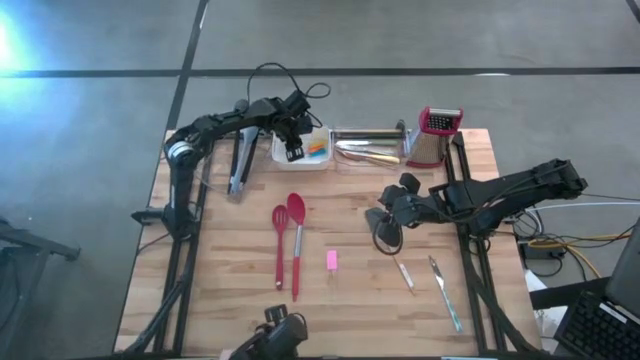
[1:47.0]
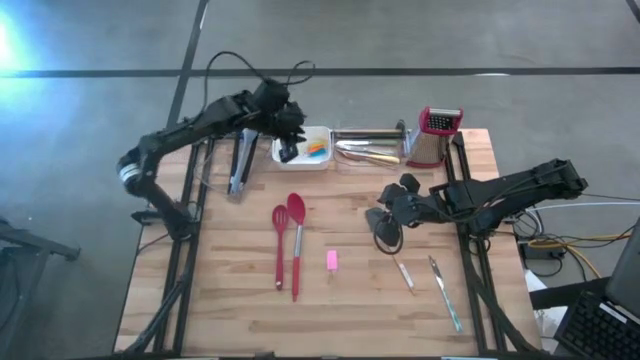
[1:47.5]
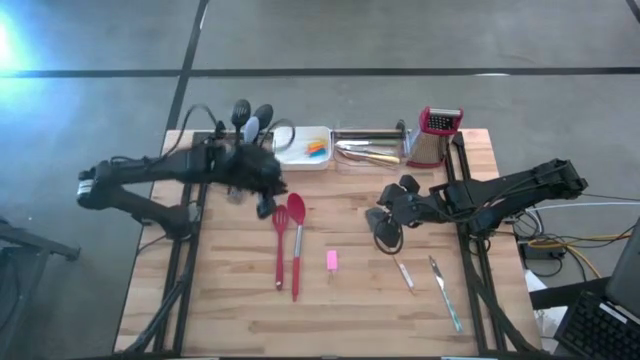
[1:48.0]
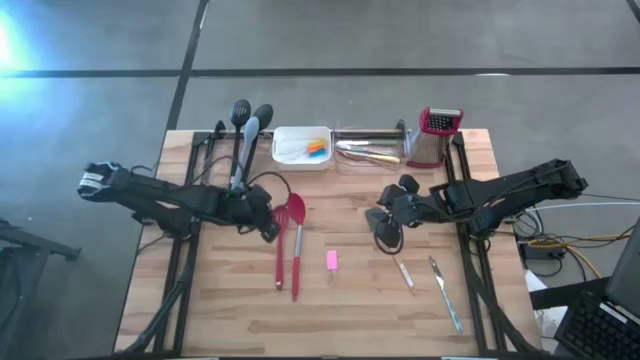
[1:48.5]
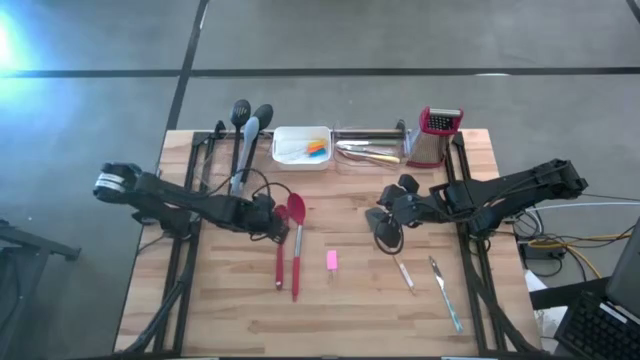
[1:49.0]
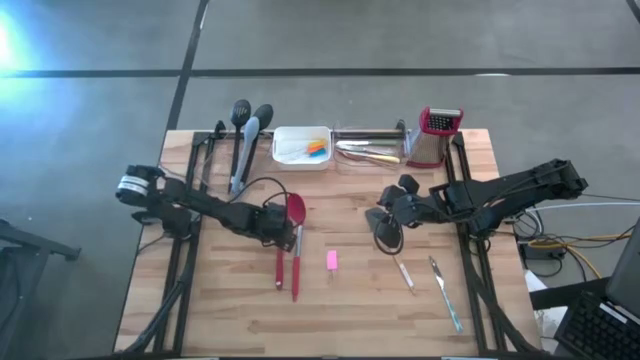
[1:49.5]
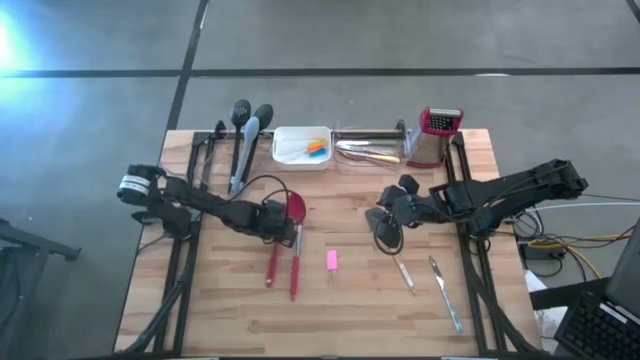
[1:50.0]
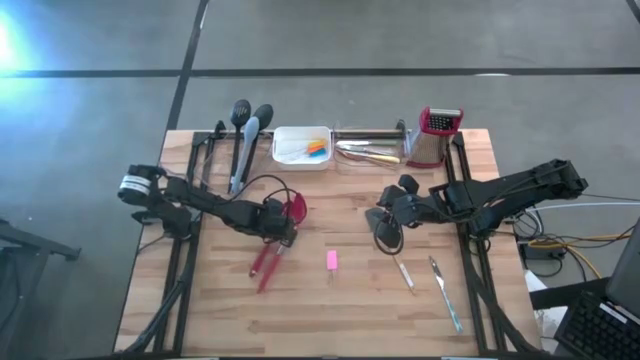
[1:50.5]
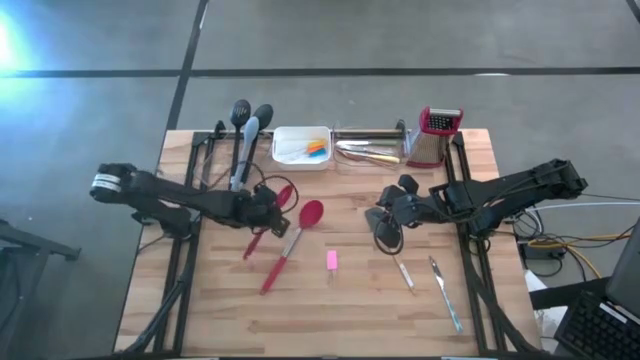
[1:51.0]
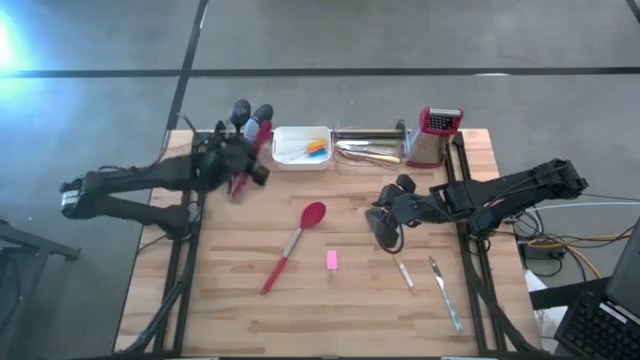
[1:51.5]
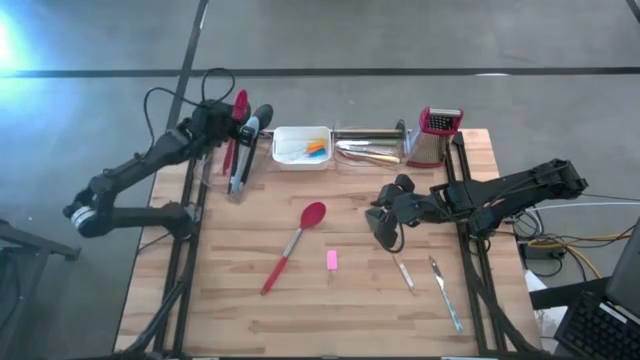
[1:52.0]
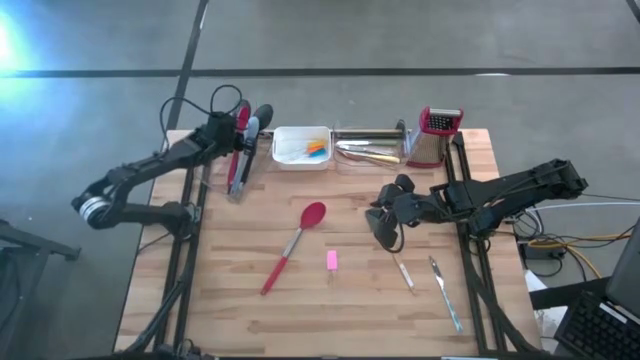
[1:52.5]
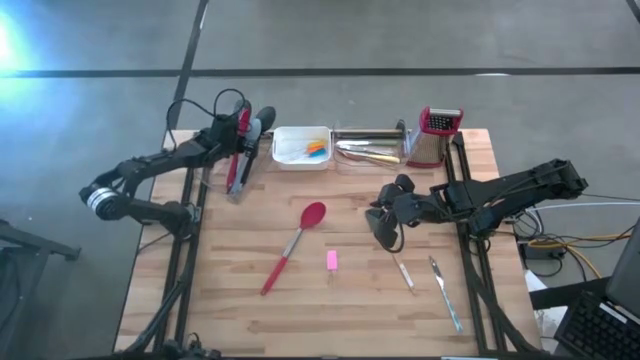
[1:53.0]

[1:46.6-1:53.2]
Task: Pick & Place Kitchen Items
Put the red slotted spoon into the left transparent bin

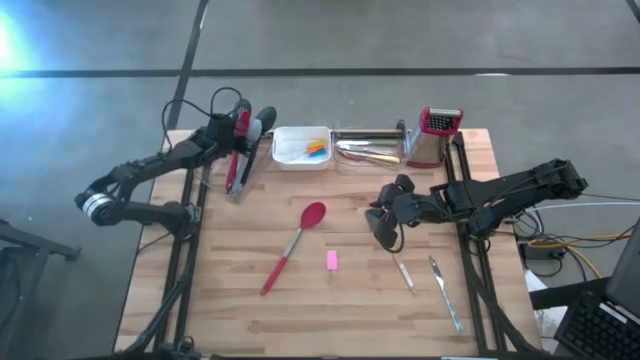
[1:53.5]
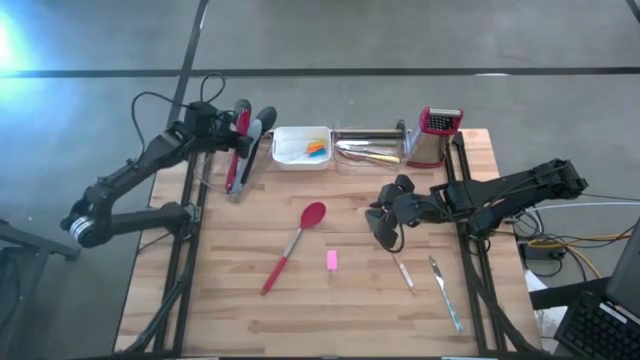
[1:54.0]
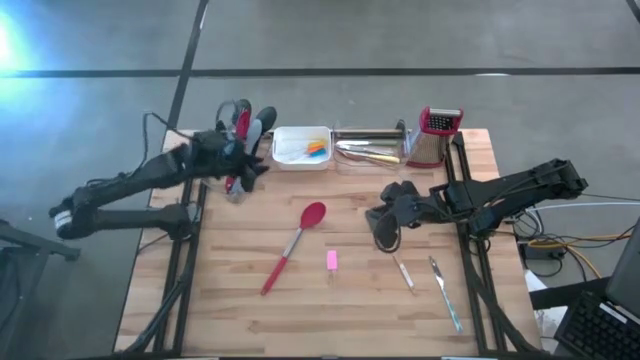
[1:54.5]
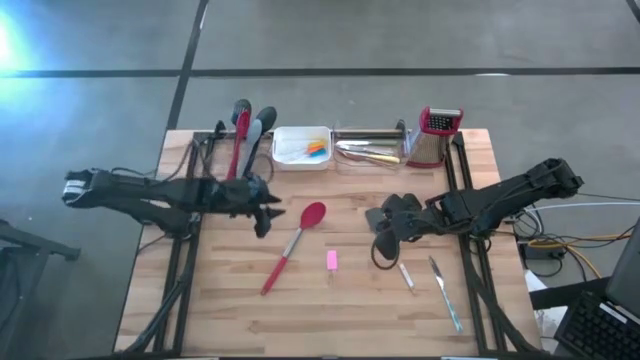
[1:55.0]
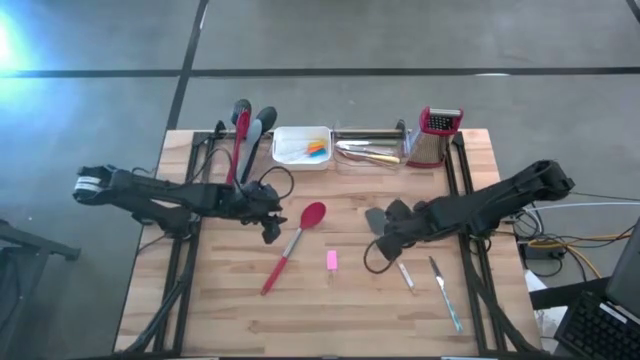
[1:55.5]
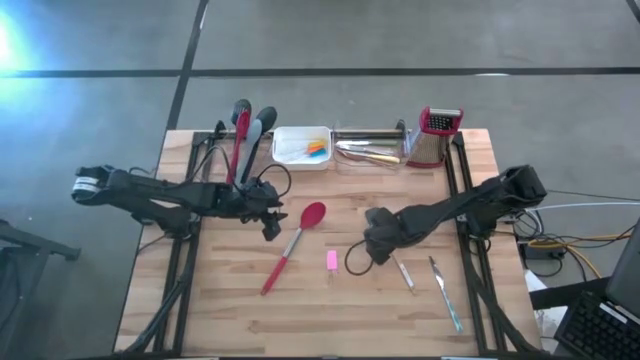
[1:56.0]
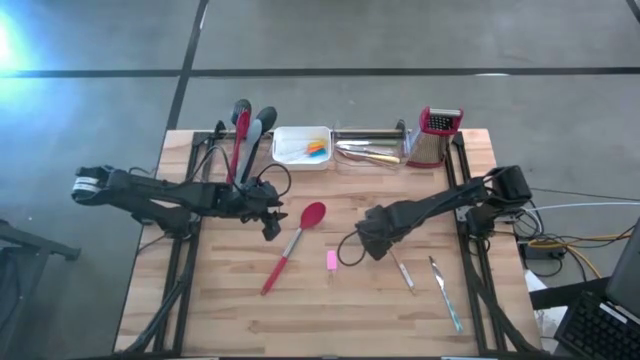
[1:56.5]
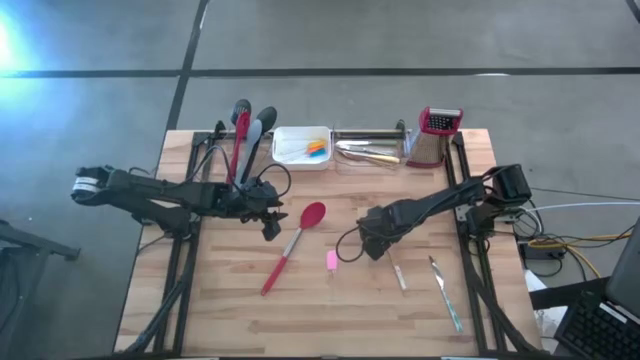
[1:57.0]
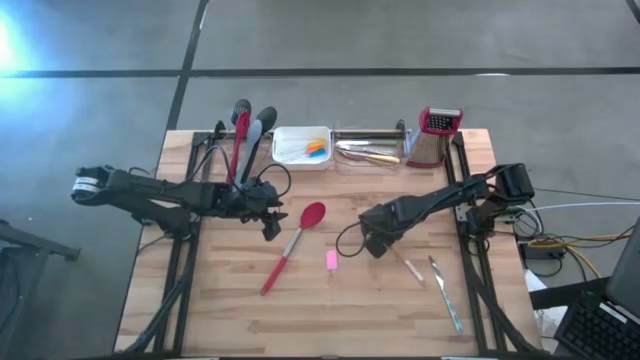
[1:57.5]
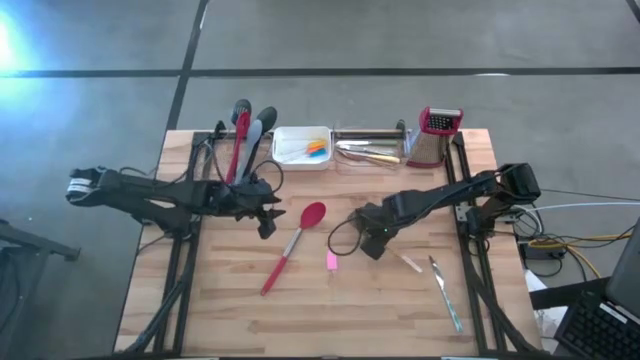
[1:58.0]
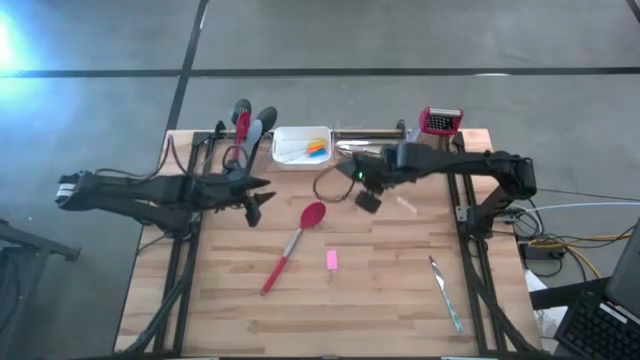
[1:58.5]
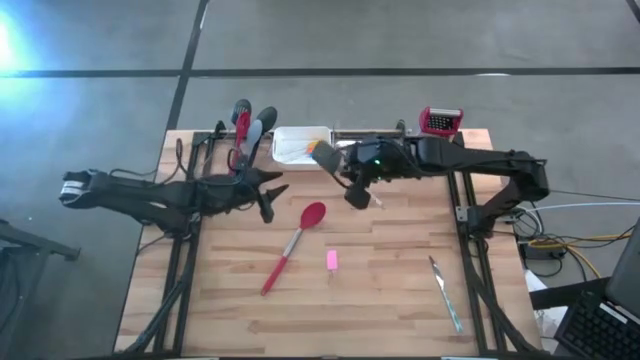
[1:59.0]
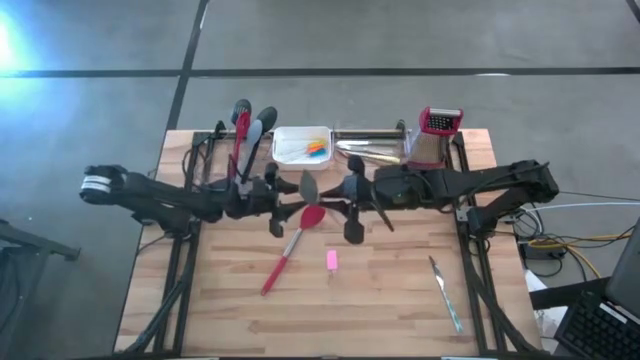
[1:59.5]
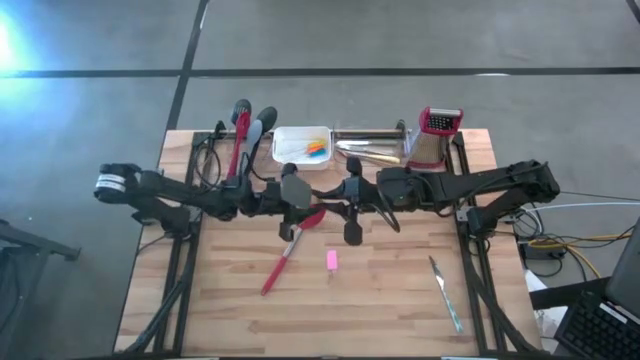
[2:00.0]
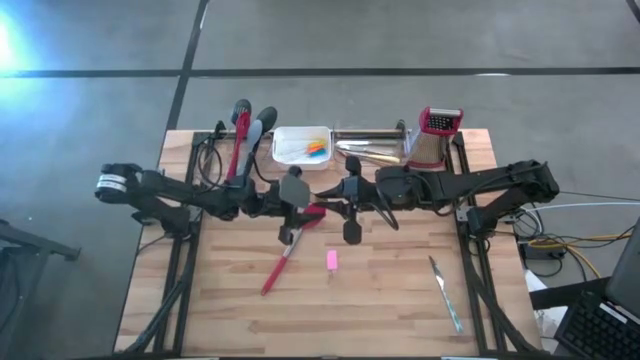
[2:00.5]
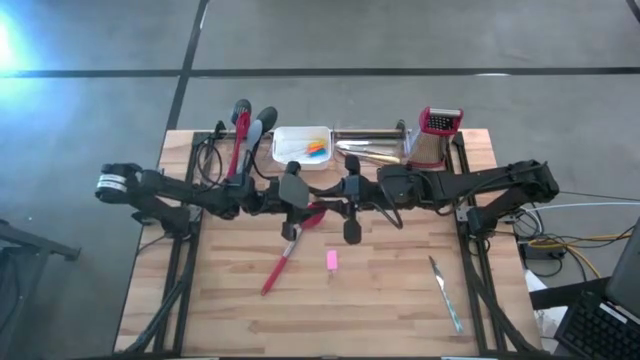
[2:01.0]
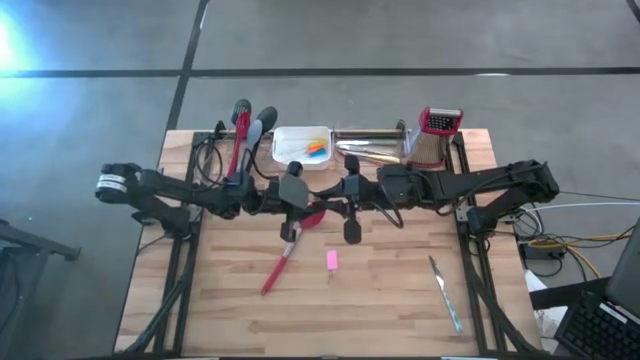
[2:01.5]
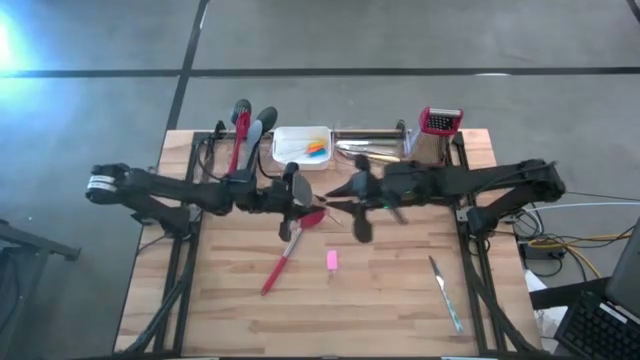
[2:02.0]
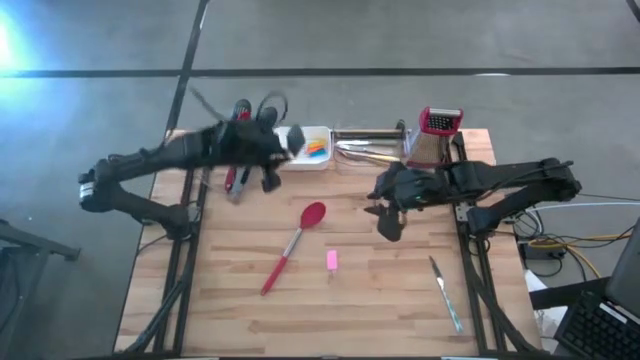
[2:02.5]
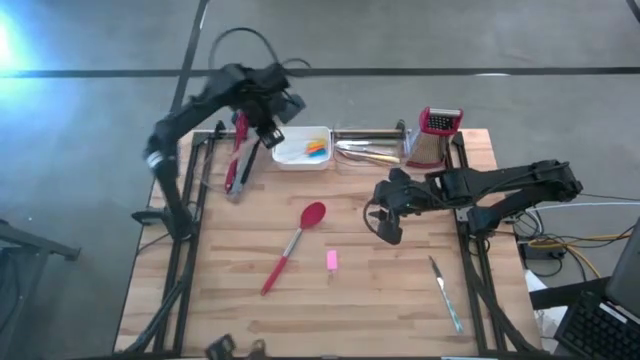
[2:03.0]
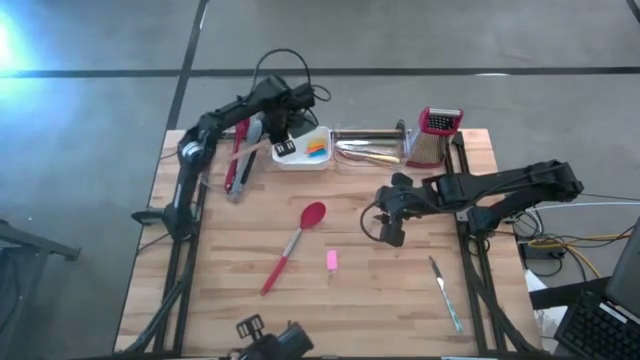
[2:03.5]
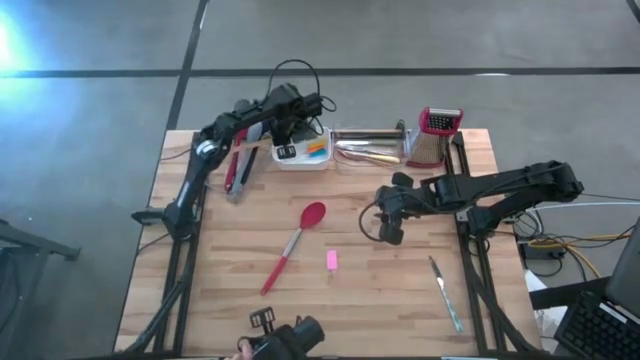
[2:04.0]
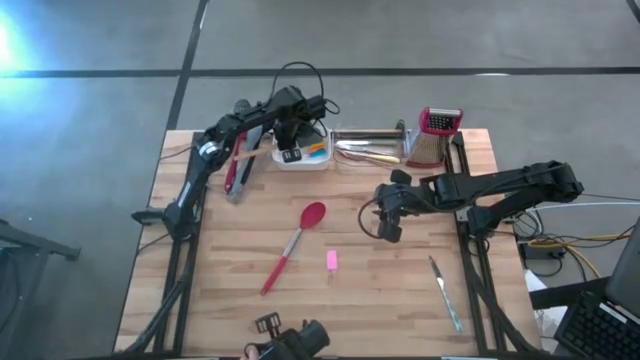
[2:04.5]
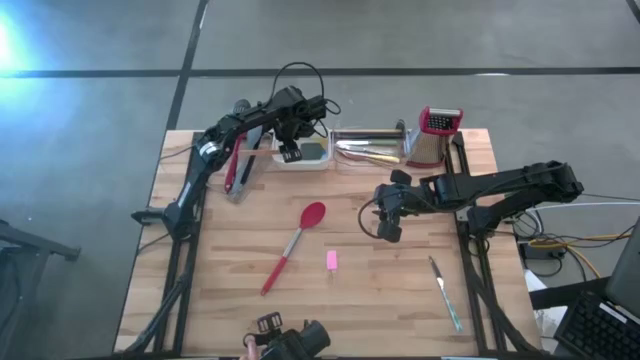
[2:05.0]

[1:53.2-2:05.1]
Put the gray spatula into the white bin

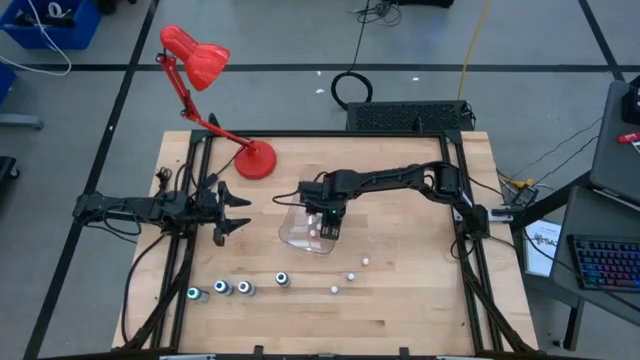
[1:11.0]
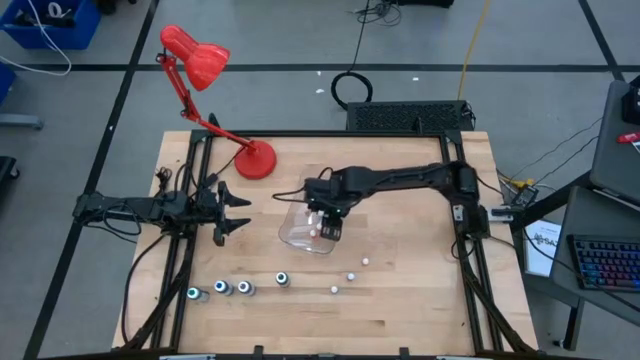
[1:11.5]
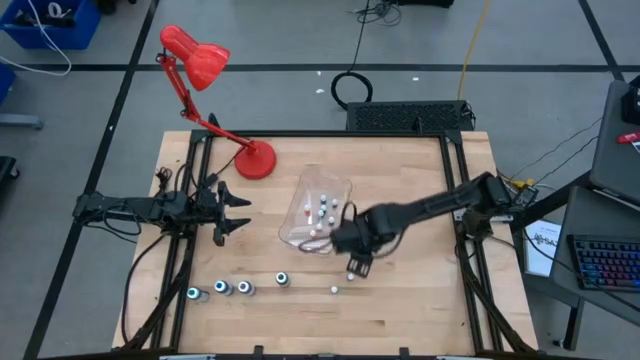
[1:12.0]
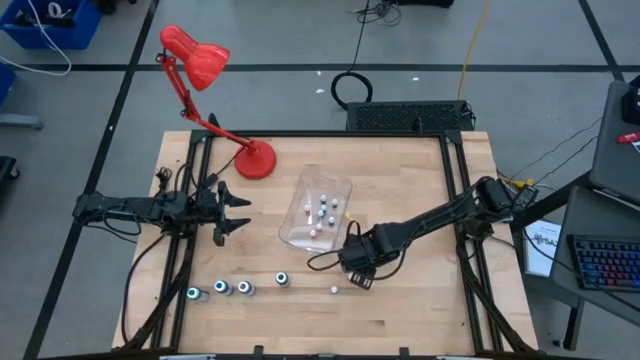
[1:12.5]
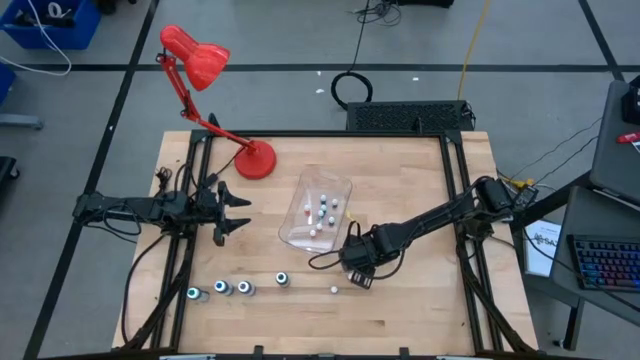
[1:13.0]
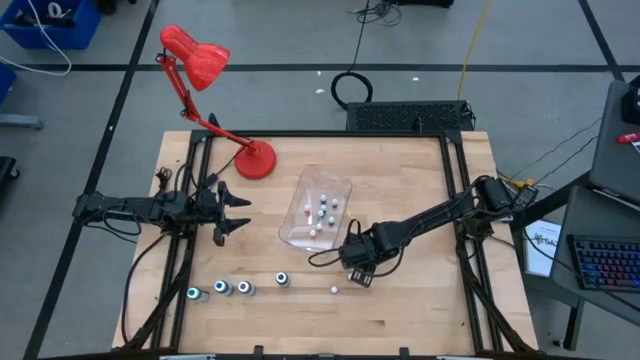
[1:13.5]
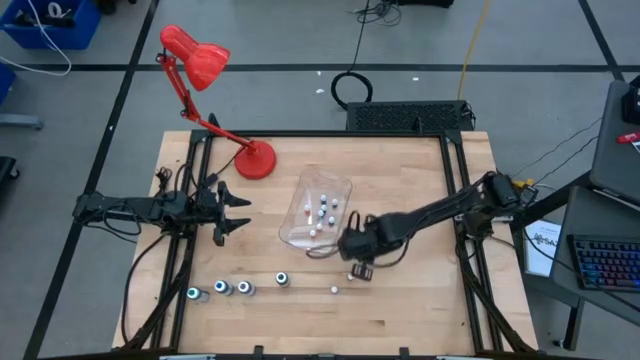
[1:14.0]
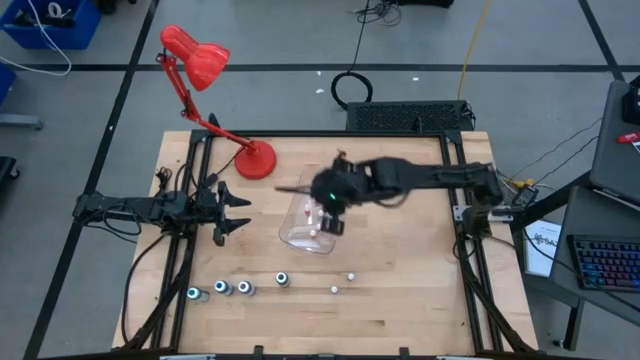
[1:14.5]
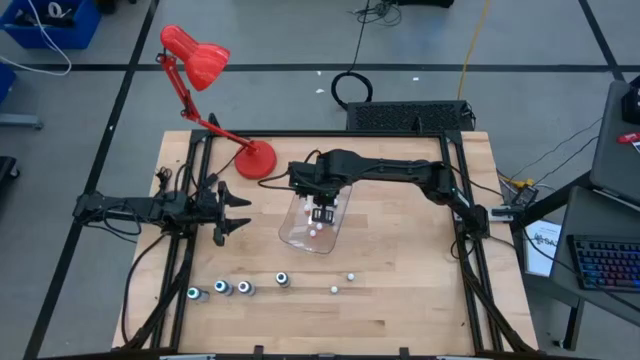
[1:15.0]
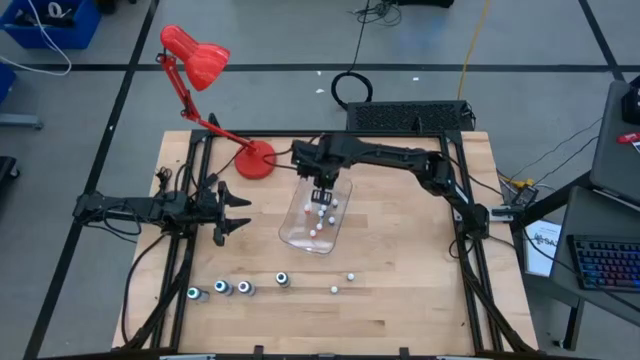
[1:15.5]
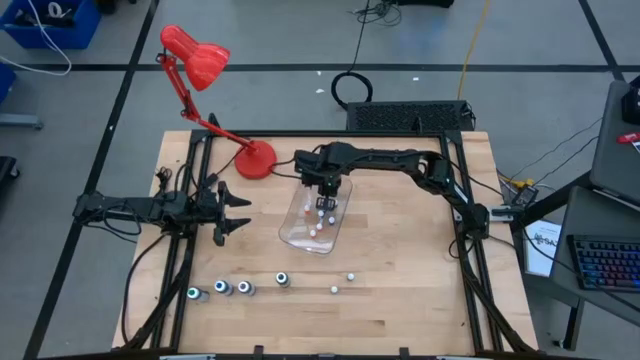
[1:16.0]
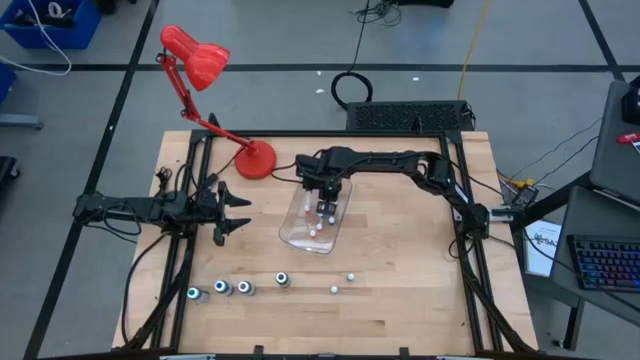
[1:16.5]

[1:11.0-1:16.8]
Task: Pick & Place food coloring
Put the small orange food coloring bottle into the transparent bin
